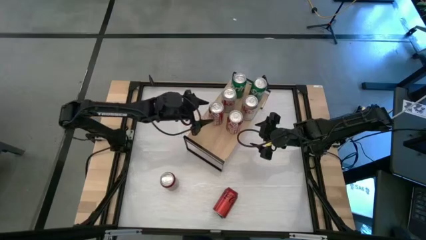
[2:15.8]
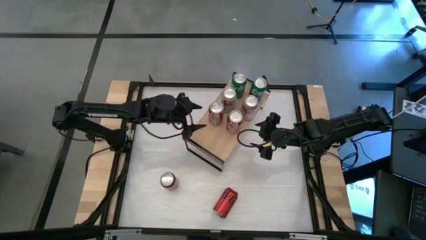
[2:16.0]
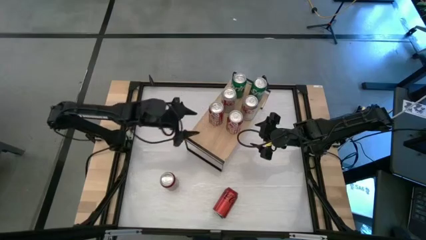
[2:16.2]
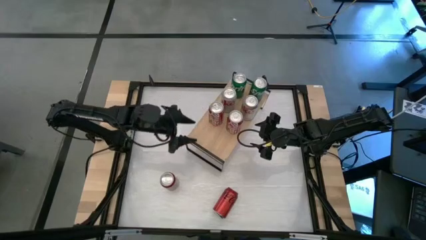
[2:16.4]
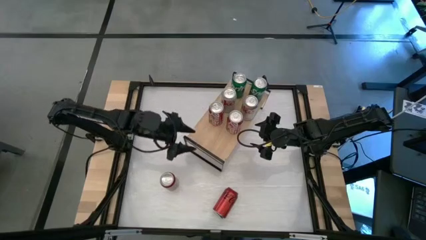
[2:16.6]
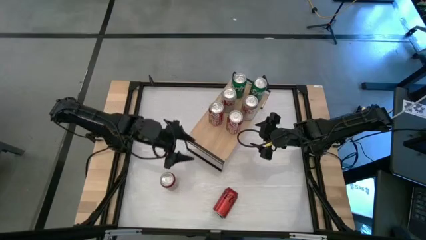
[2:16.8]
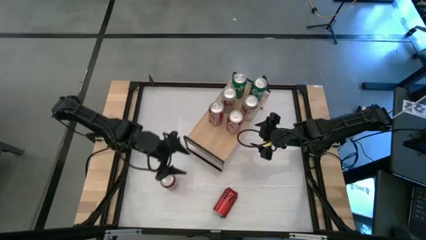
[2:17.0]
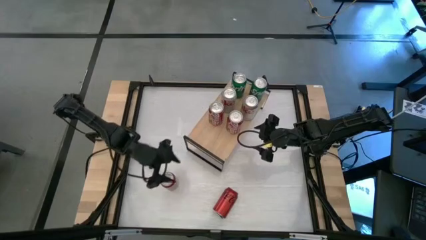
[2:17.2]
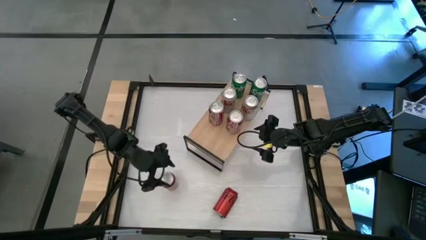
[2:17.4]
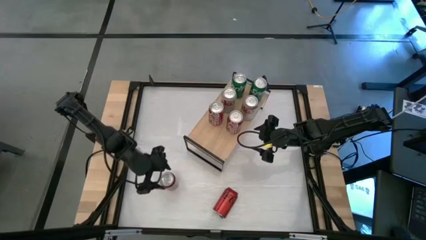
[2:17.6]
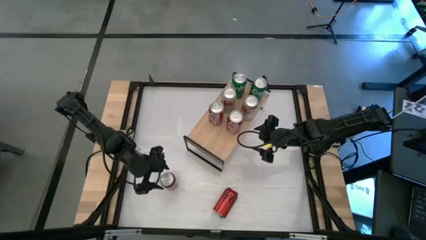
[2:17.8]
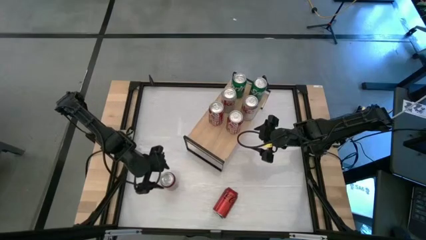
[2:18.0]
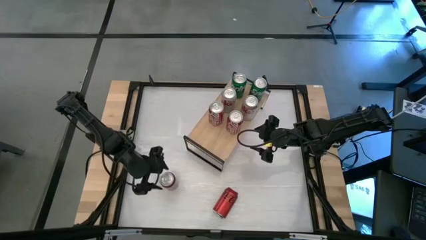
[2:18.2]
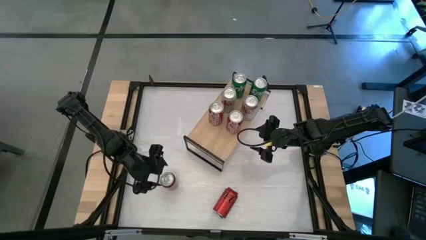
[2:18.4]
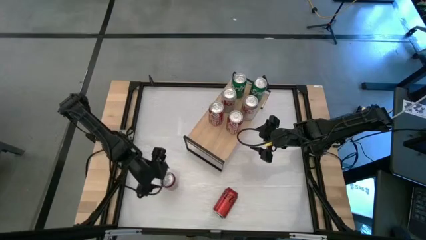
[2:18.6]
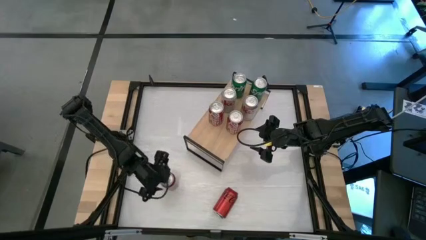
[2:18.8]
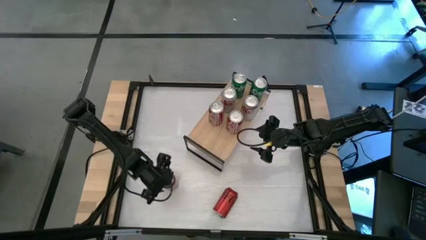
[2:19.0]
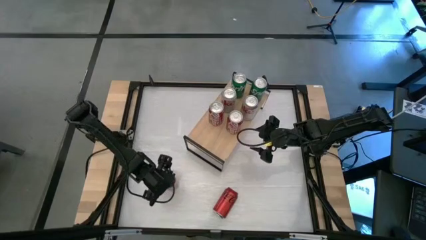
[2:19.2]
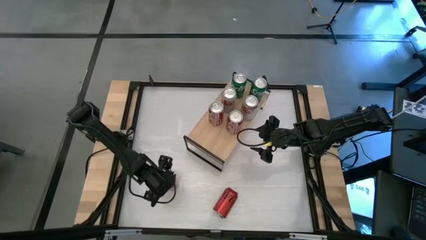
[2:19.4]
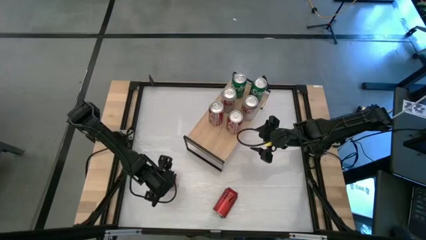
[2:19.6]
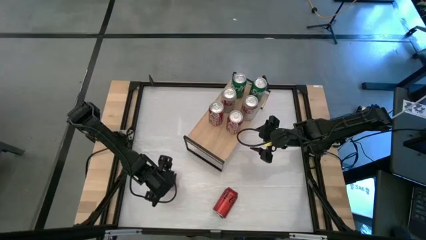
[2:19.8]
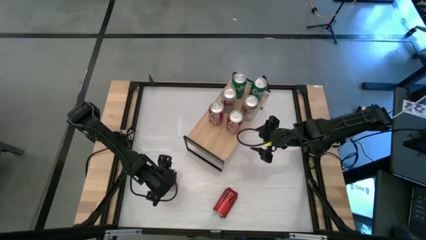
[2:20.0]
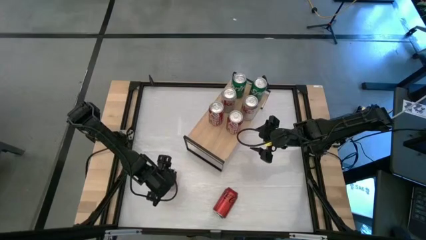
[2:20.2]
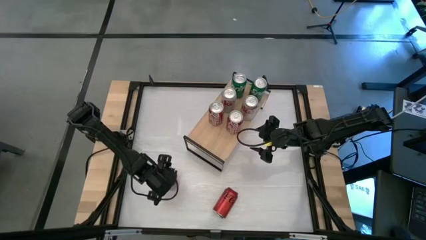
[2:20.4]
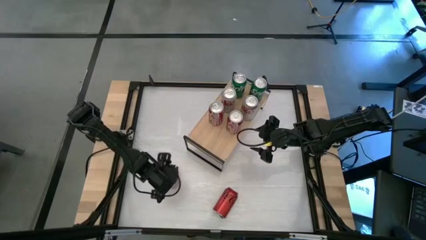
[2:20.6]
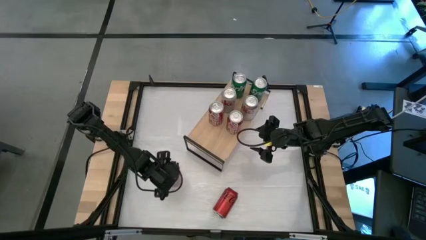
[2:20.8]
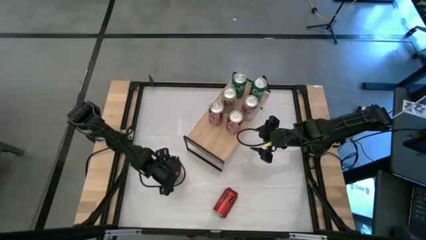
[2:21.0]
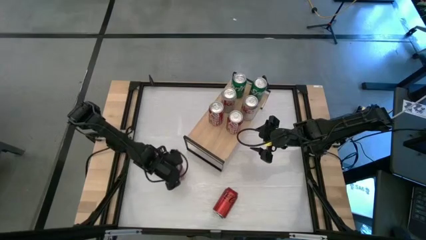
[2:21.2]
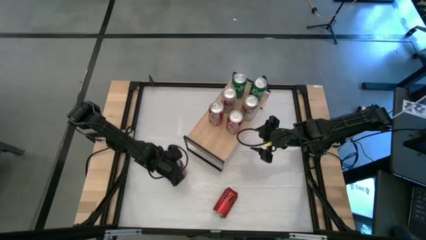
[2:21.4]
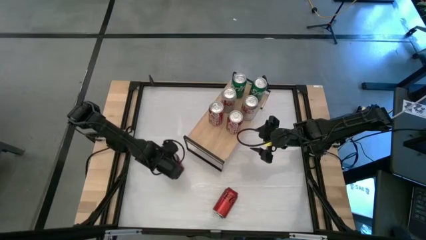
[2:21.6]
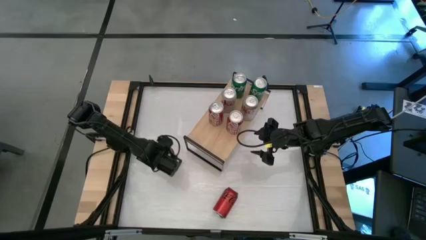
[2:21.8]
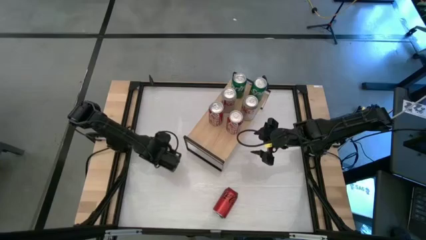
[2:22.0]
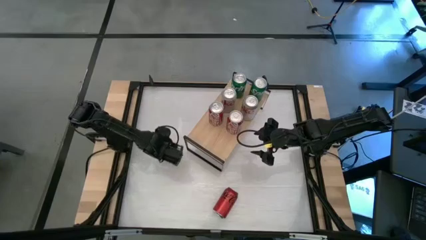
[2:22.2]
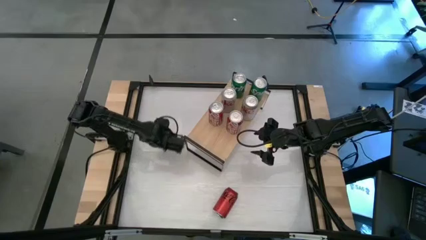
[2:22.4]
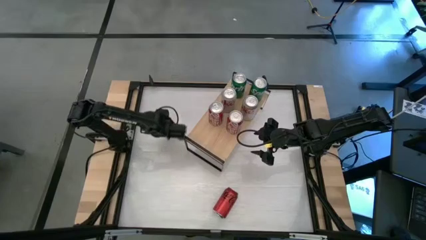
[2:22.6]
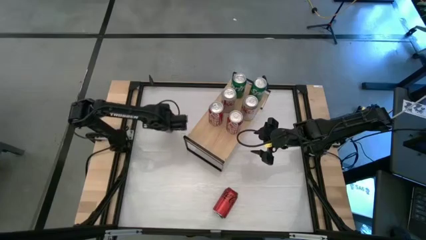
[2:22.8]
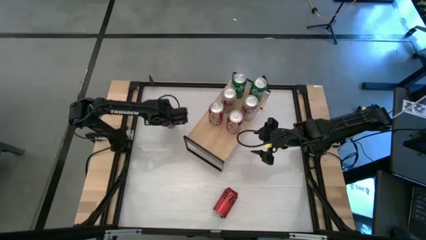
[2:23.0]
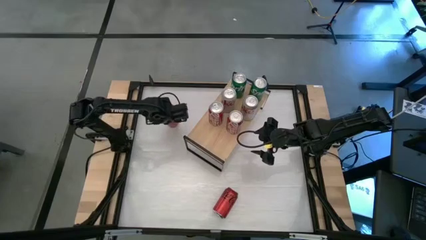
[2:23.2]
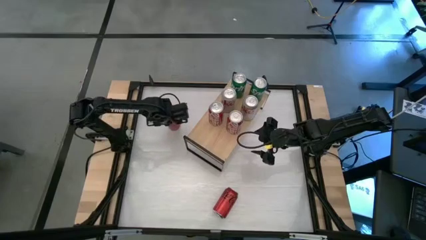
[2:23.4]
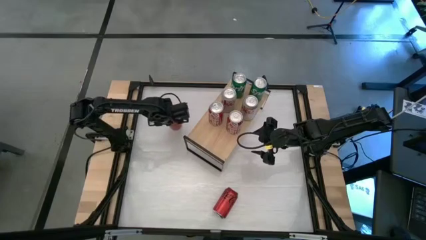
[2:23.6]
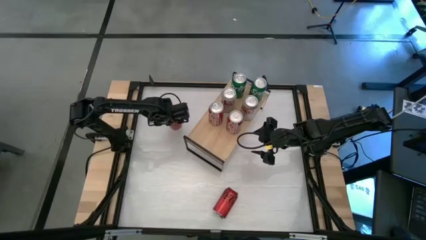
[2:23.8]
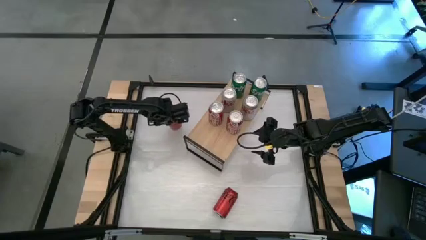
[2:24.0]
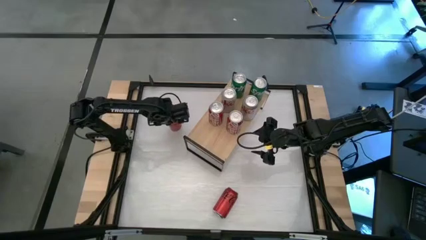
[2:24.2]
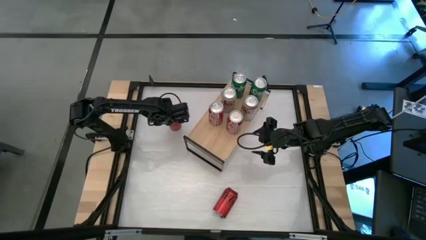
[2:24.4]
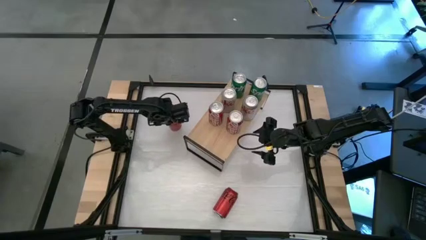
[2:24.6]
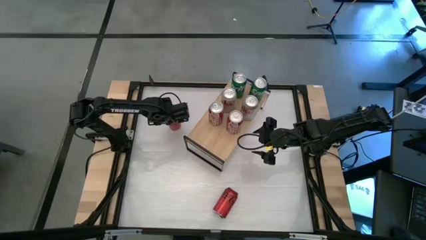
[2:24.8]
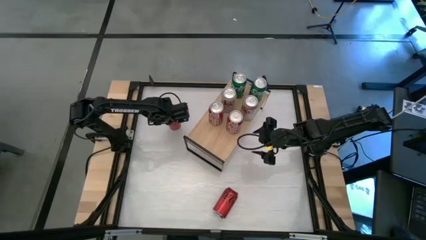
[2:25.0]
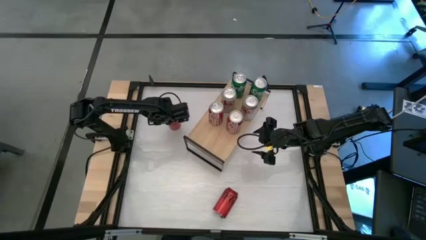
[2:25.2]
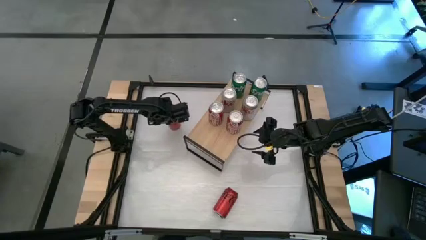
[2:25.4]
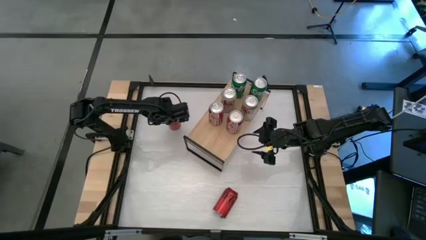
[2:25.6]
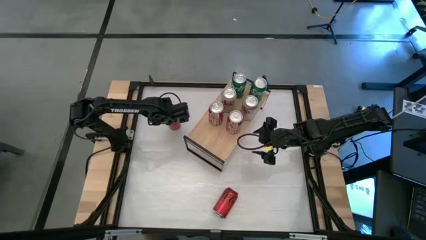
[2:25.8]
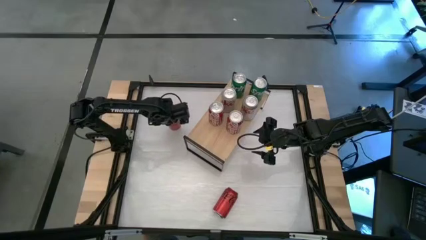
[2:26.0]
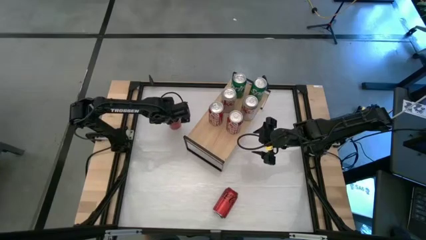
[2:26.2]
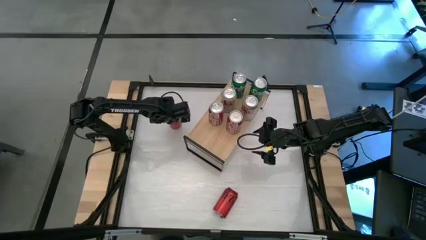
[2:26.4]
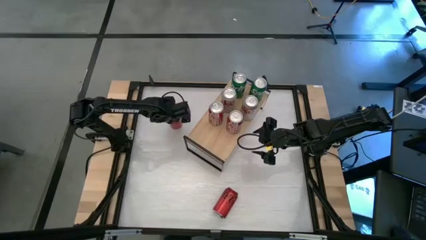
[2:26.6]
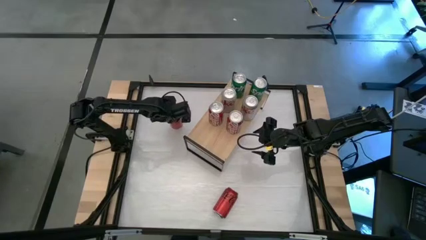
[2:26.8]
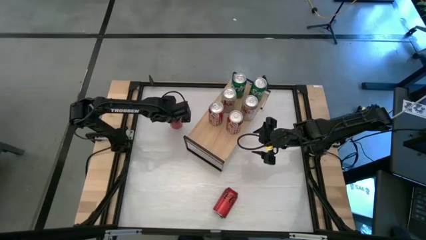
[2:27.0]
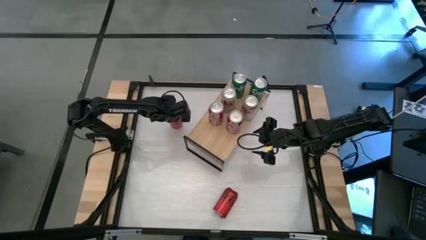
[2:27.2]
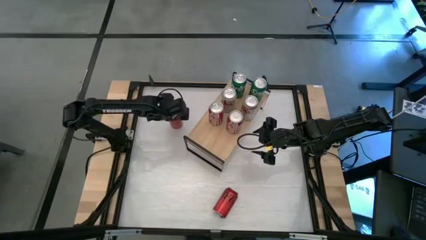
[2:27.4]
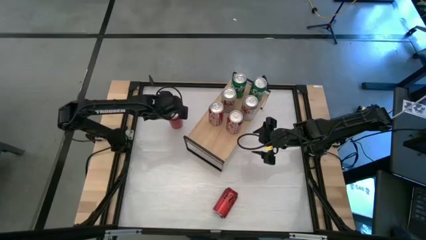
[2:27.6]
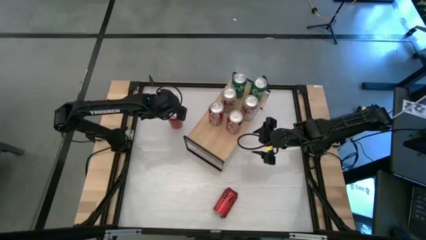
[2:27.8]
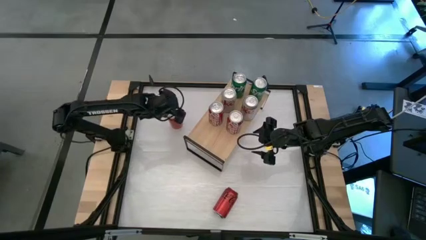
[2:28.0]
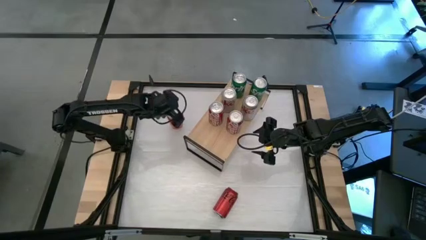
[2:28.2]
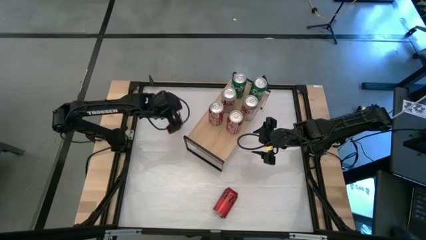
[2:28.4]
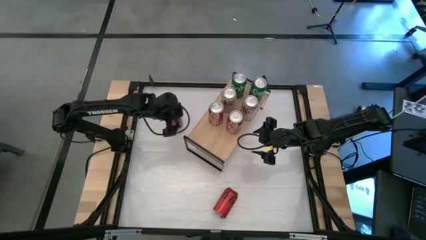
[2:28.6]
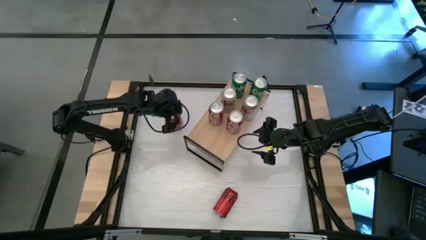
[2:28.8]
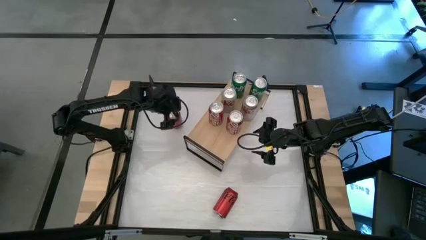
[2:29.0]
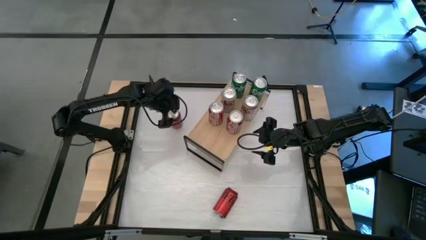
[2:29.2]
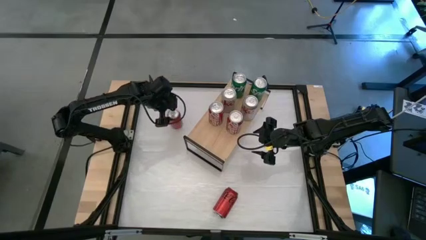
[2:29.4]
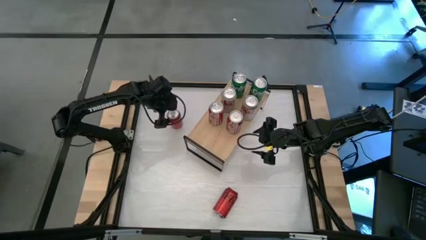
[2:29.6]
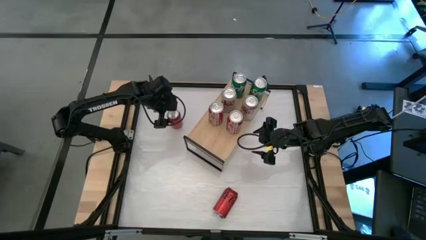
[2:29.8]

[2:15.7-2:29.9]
Task: Place canned beverage on shelf
Put the left red-black soda can on the shelf
